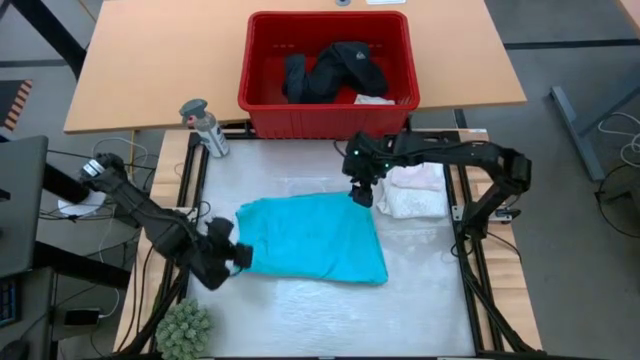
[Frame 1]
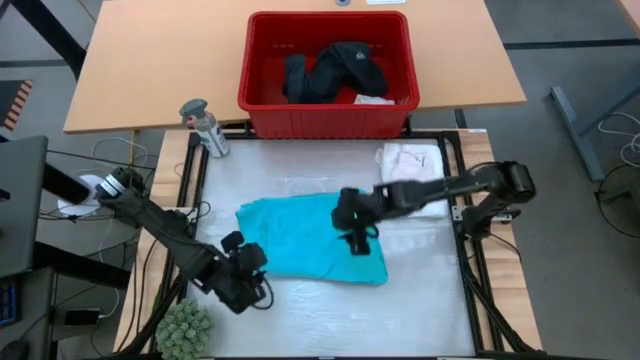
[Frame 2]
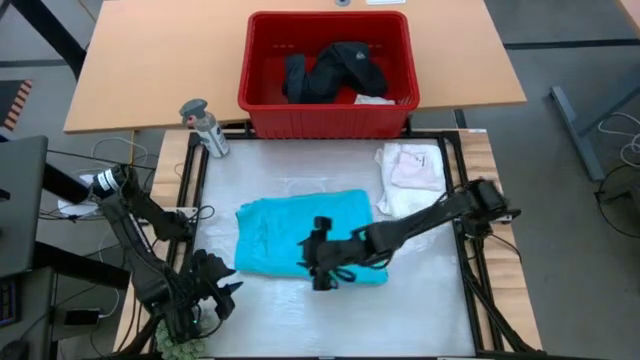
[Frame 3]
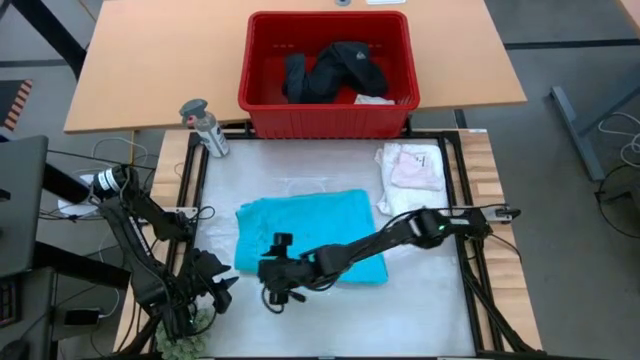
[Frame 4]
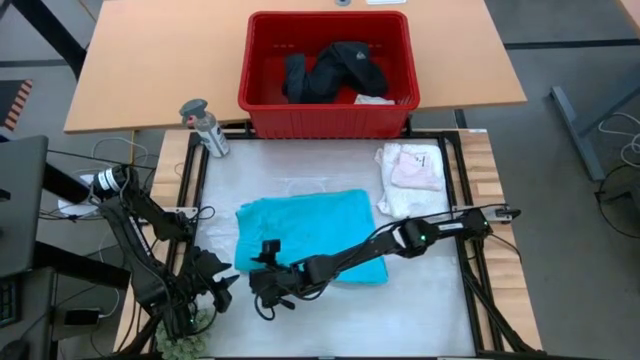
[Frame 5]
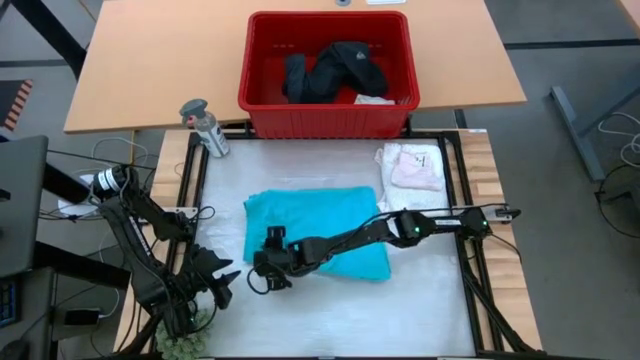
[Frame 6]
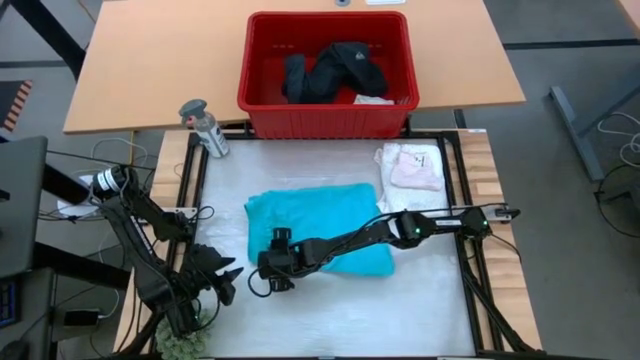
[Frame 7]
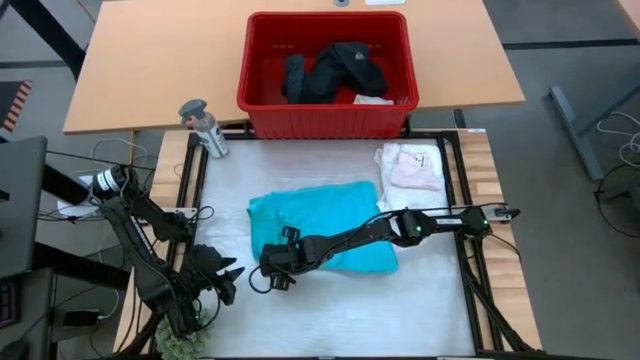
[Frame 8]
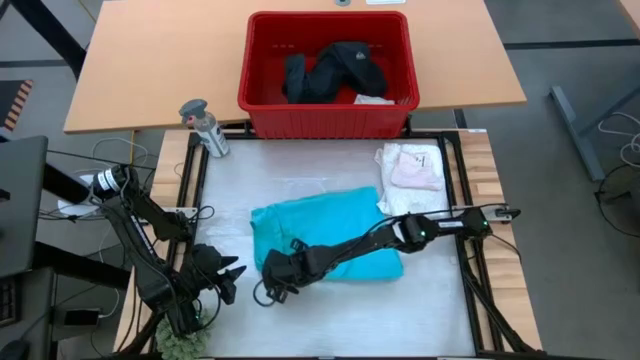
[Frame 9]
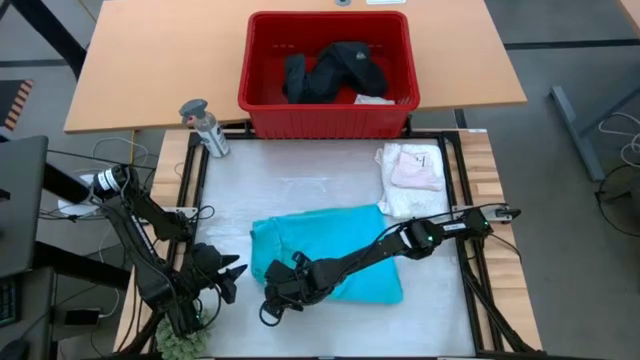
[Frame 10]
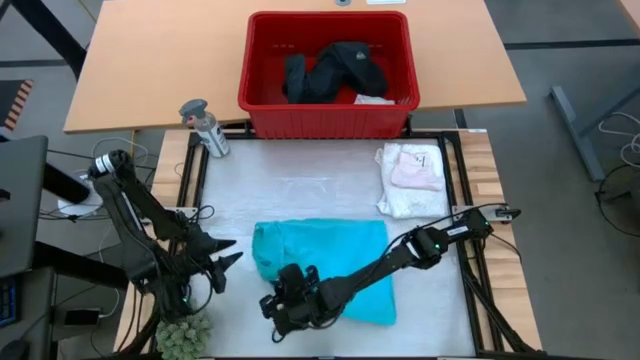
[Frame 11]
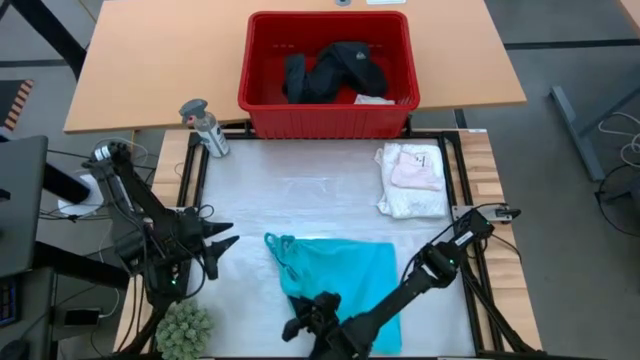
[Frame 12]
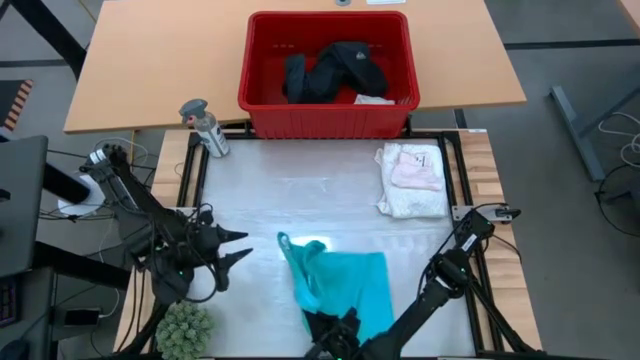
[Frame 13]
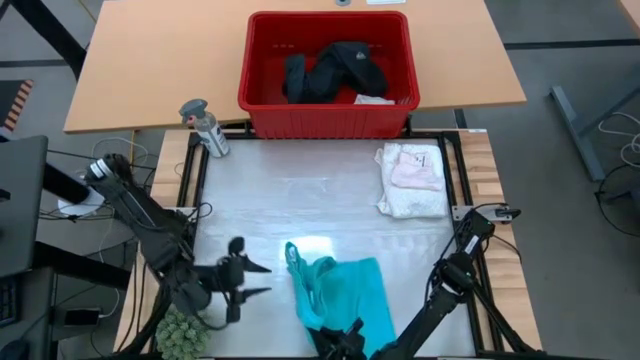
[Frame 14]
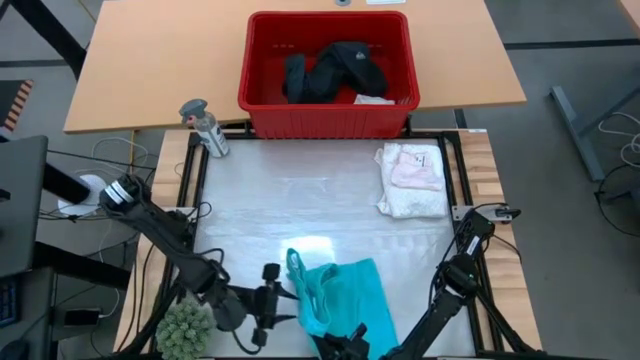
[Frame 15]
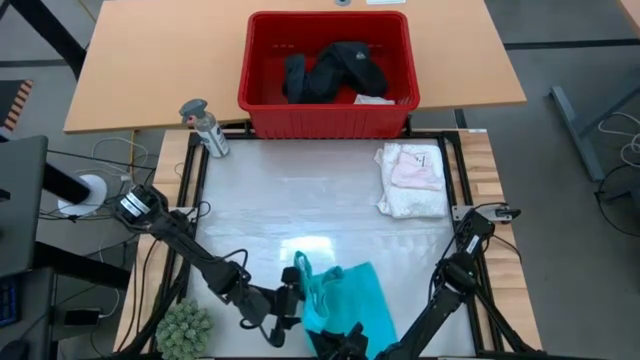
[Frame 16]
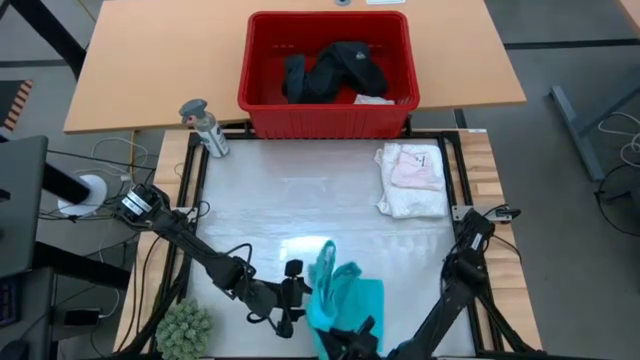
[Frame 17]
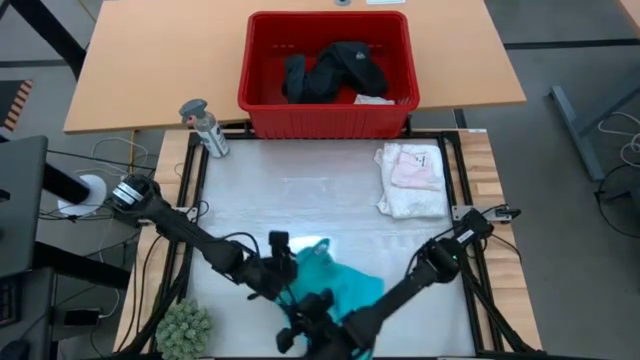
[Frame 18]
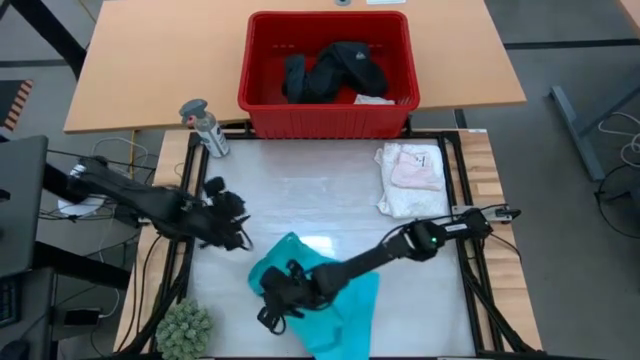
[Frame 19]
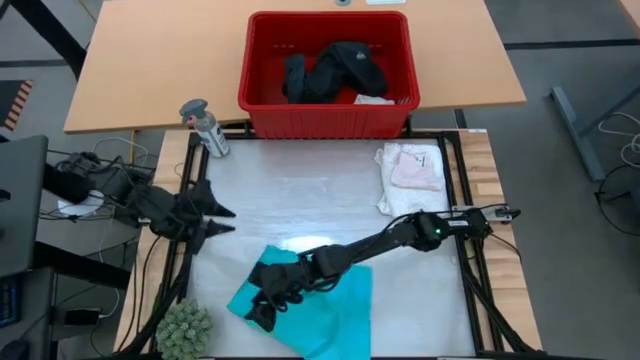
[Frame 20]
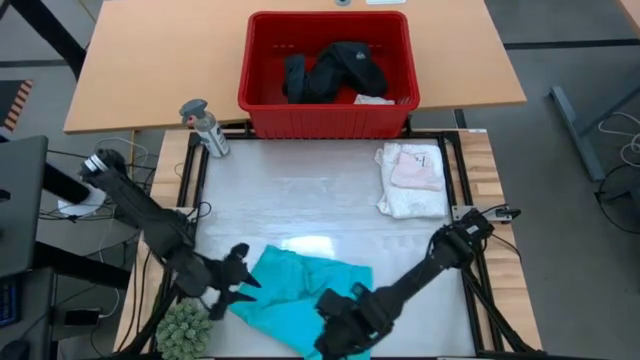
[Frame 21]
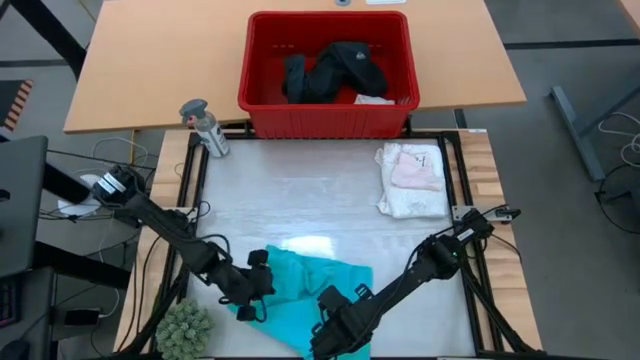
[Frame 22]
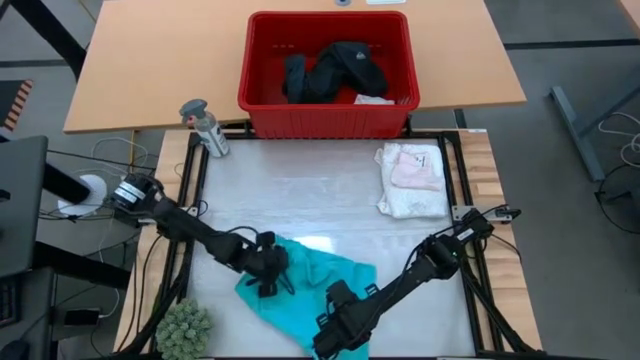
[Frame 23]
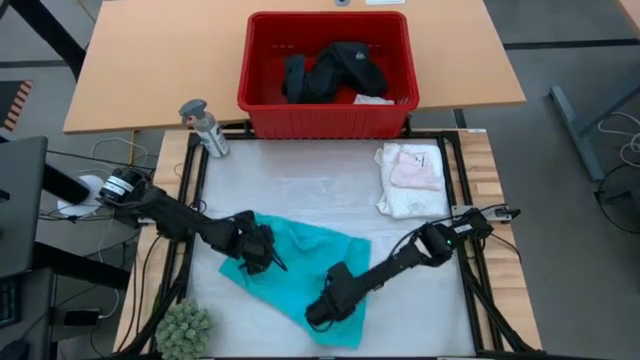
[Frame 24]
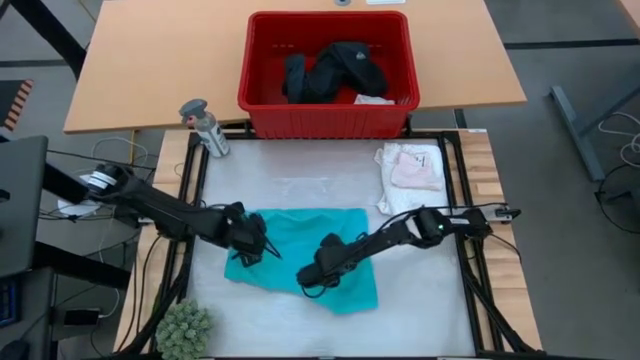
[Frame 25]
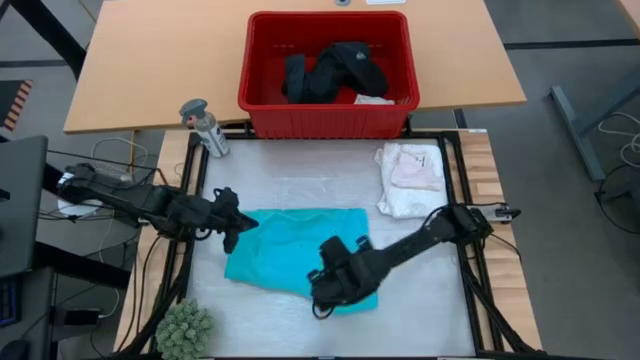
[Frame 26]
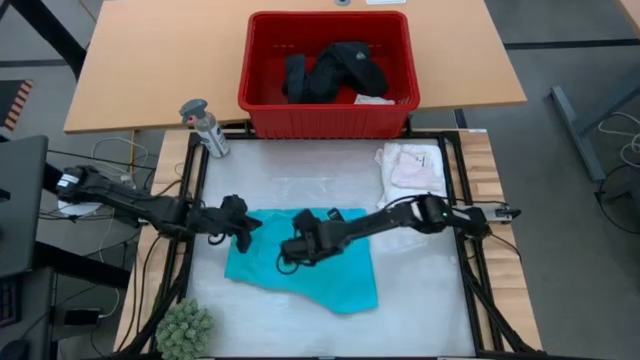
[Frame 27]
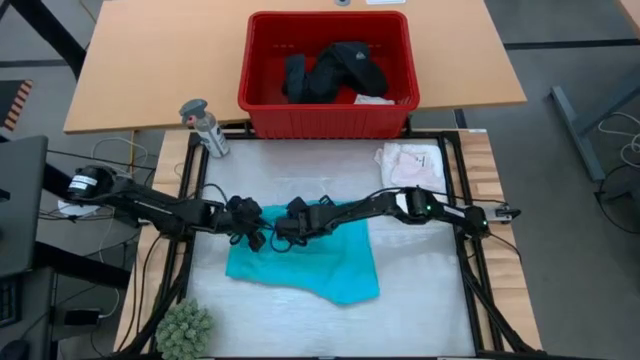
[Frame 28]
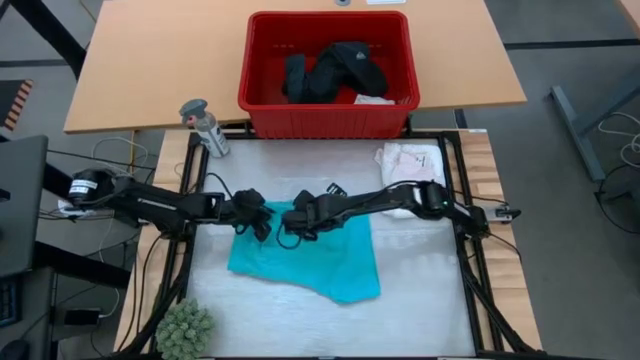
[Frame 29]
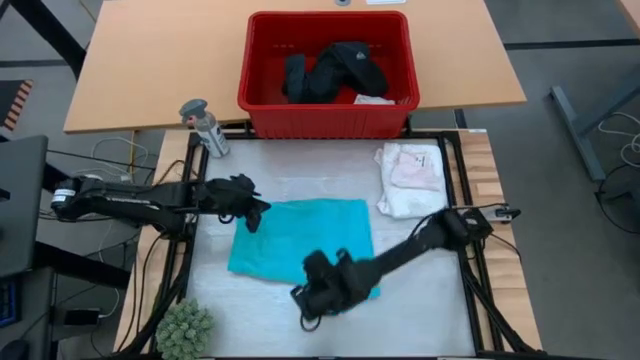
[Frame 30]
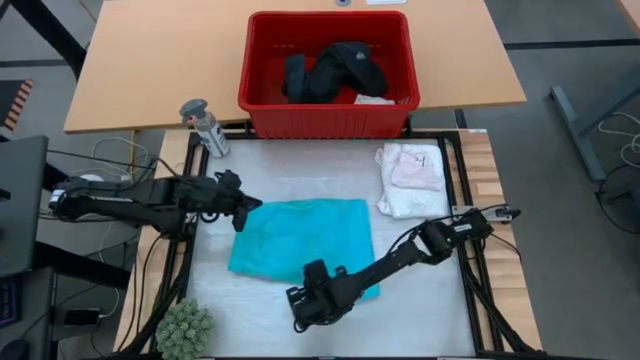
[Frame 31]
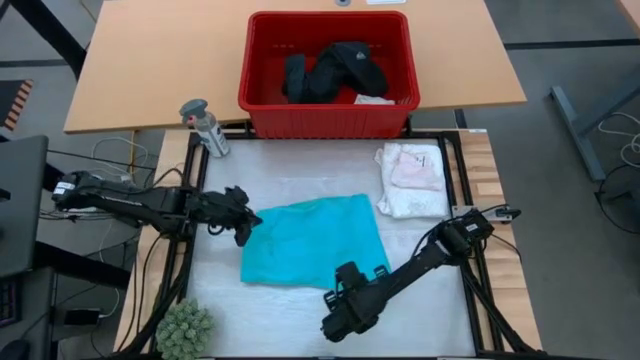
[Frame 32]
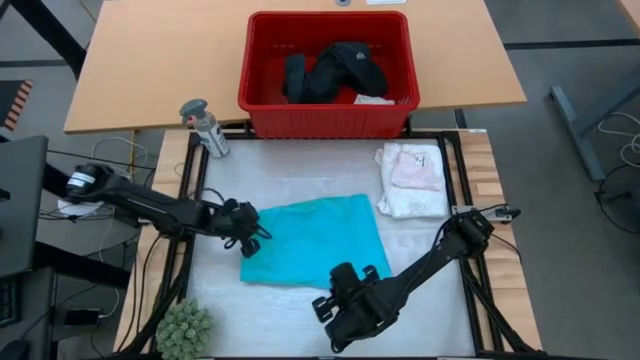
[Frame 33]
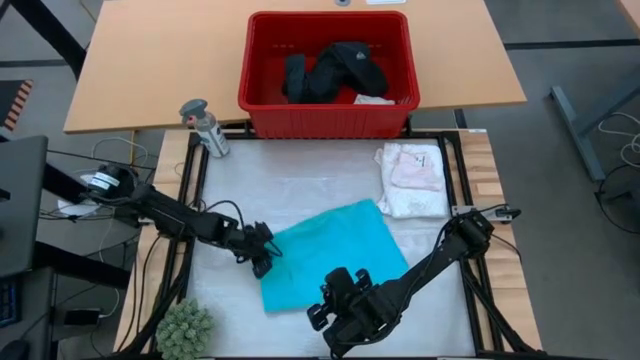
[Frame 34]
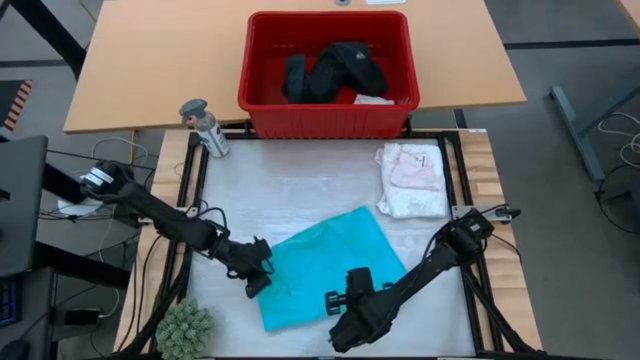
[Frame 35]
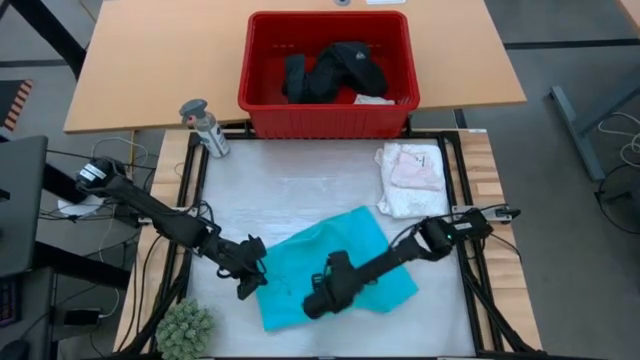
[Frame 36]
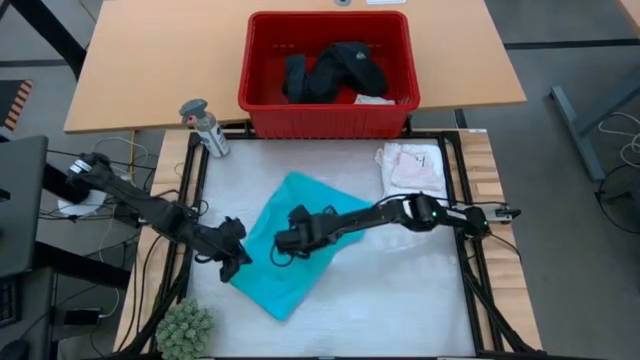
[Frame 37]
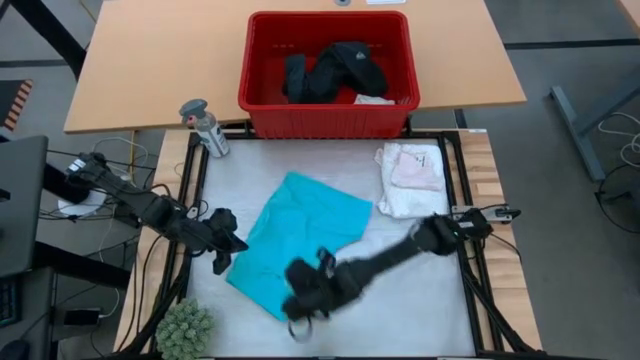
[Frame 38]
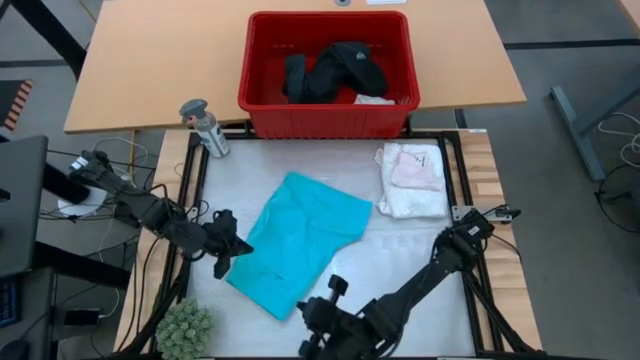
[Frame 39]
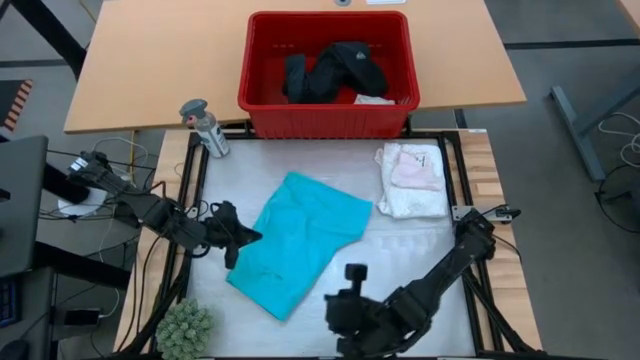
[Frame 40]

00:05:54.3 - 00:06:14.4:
Task: Fold Laundry from Bin
Fold the light blue shorts
